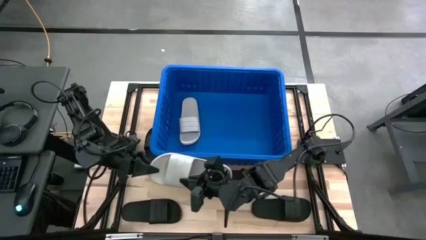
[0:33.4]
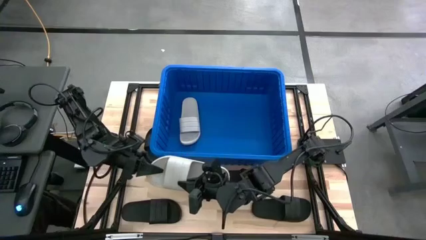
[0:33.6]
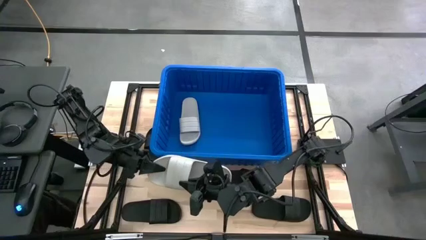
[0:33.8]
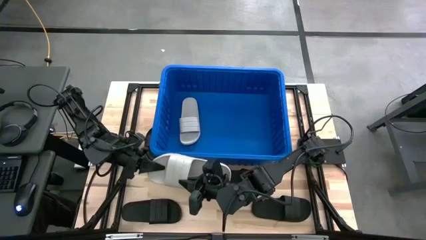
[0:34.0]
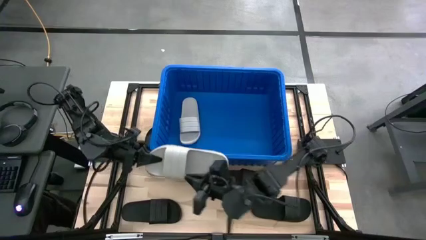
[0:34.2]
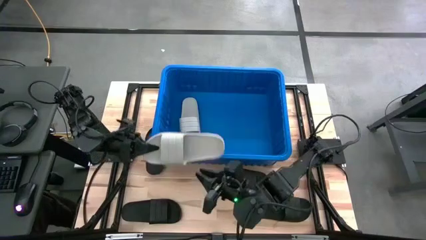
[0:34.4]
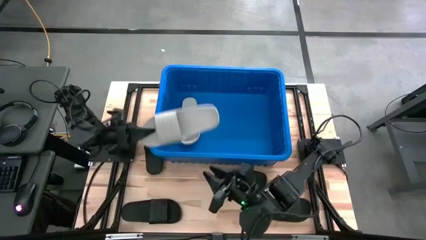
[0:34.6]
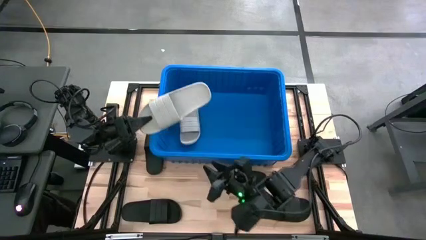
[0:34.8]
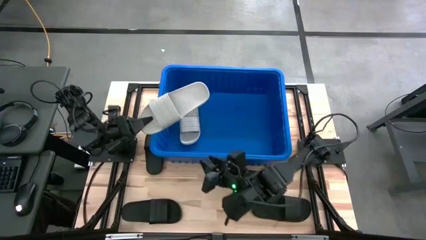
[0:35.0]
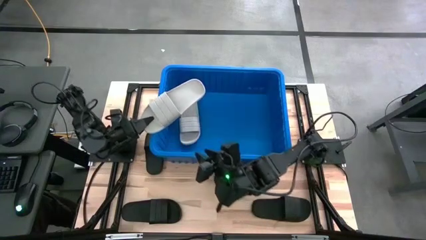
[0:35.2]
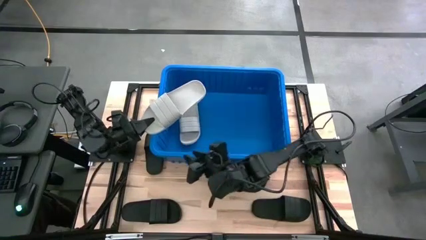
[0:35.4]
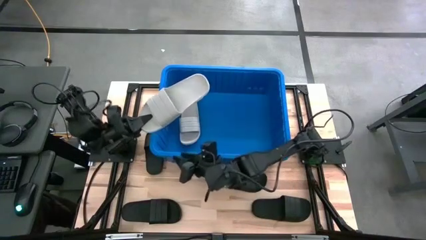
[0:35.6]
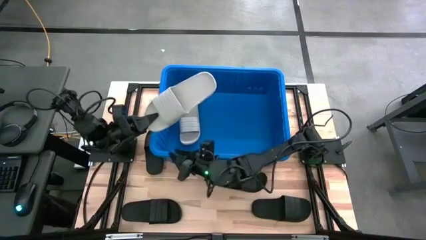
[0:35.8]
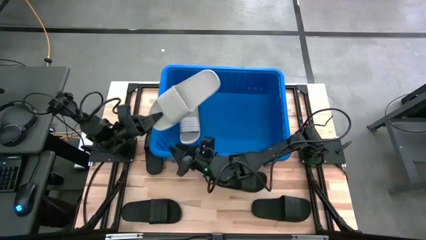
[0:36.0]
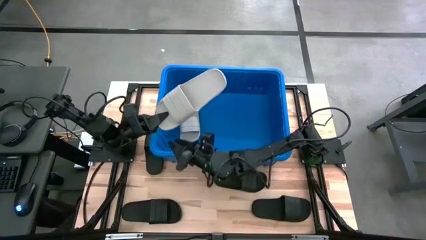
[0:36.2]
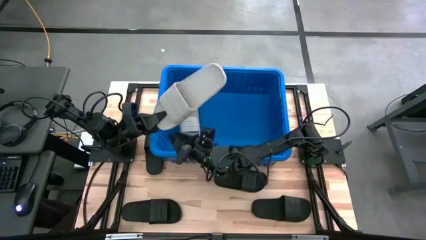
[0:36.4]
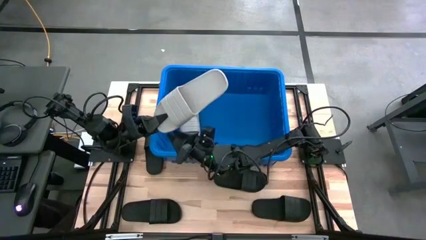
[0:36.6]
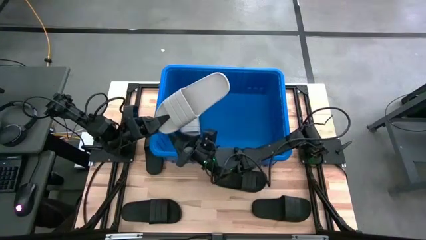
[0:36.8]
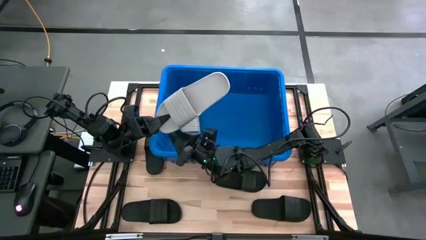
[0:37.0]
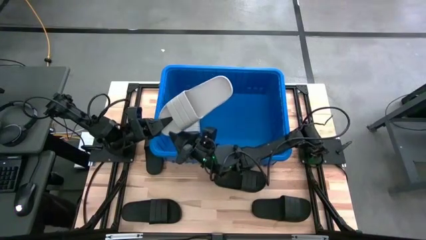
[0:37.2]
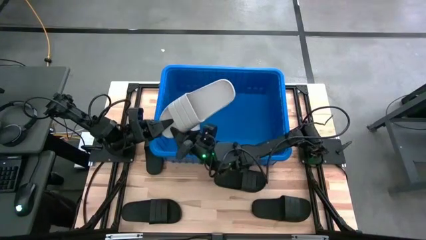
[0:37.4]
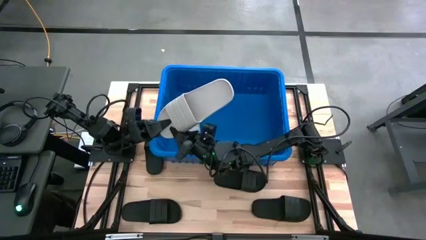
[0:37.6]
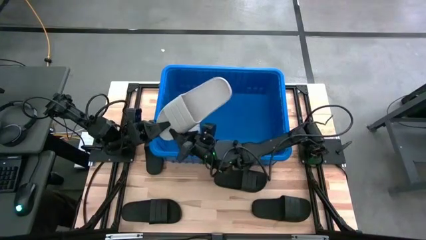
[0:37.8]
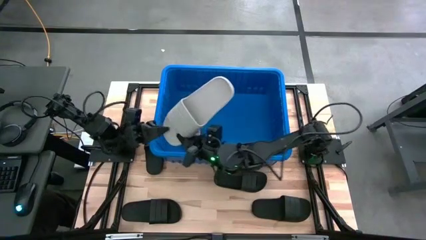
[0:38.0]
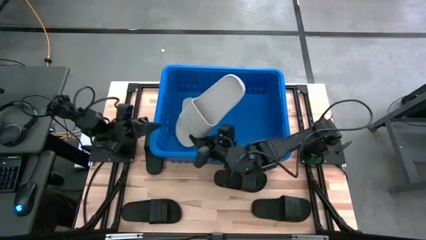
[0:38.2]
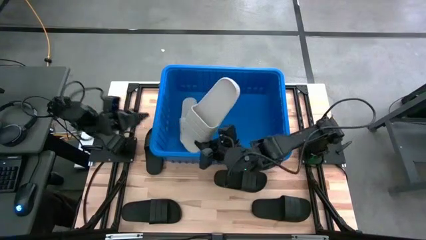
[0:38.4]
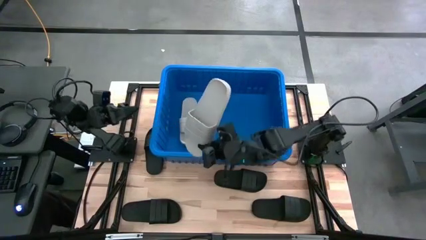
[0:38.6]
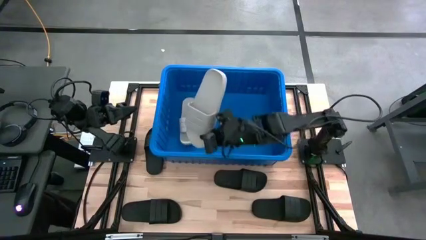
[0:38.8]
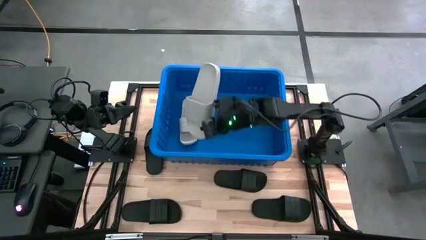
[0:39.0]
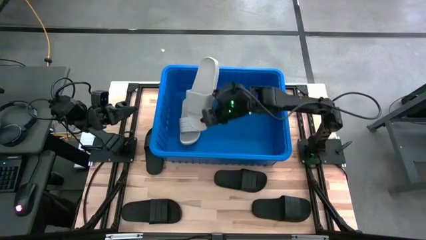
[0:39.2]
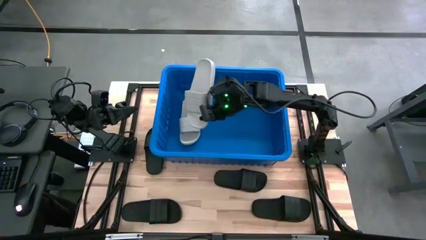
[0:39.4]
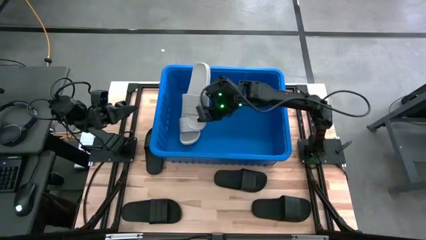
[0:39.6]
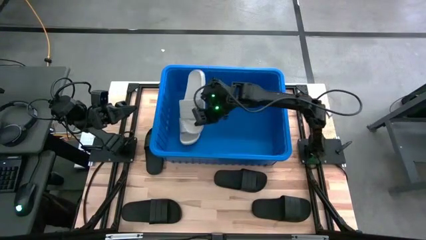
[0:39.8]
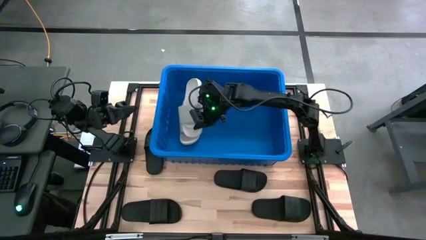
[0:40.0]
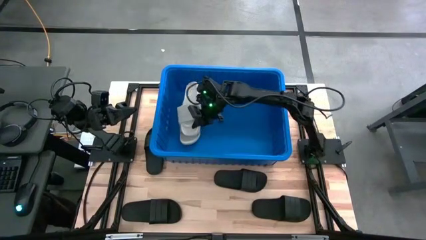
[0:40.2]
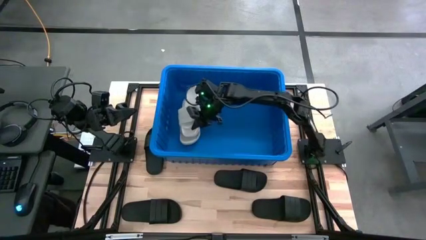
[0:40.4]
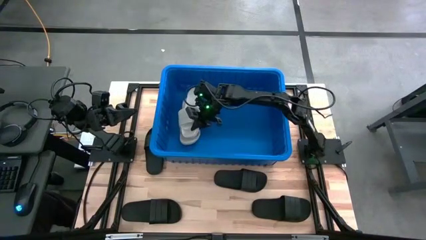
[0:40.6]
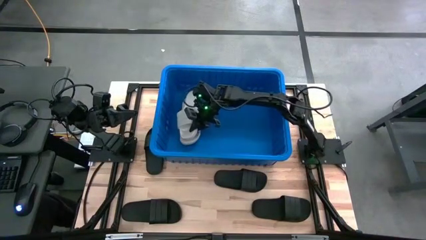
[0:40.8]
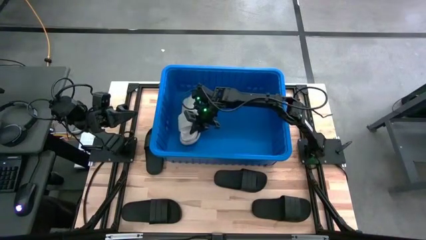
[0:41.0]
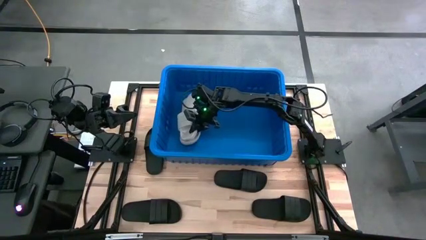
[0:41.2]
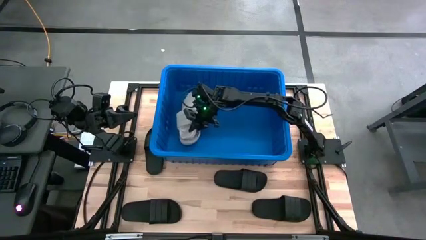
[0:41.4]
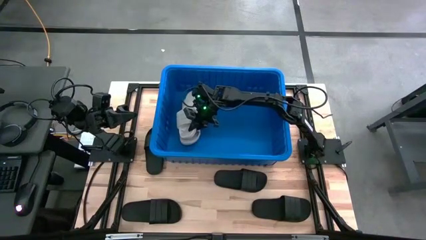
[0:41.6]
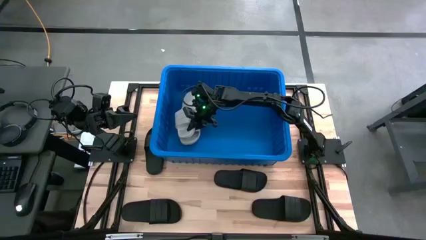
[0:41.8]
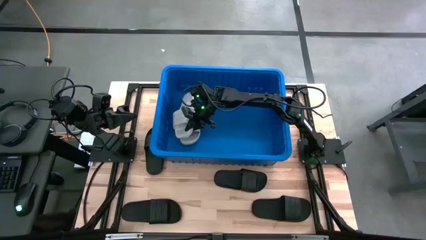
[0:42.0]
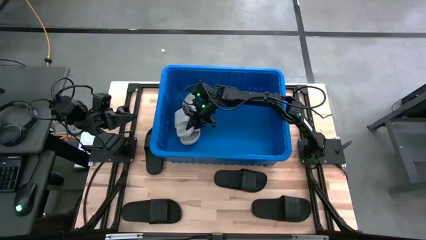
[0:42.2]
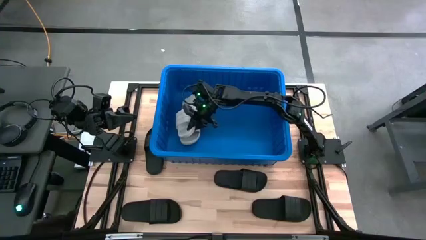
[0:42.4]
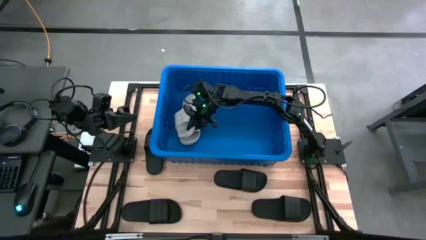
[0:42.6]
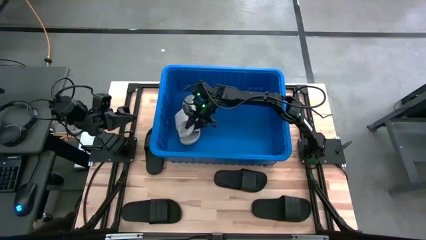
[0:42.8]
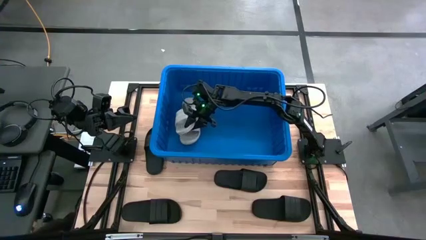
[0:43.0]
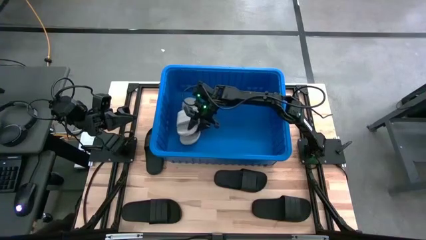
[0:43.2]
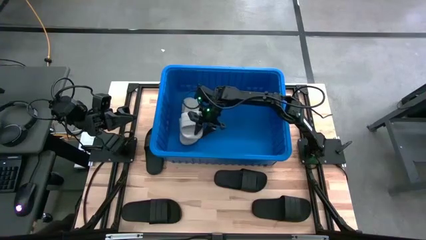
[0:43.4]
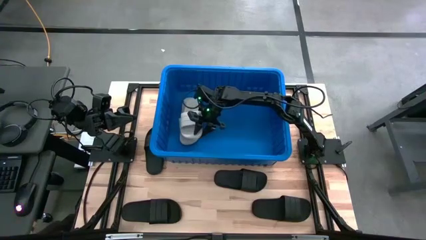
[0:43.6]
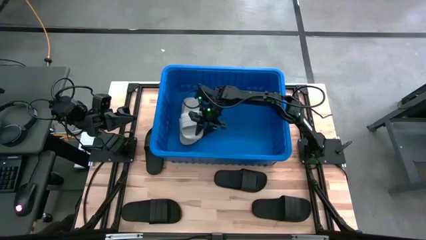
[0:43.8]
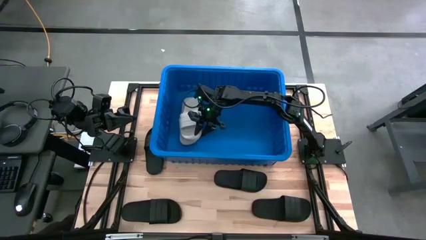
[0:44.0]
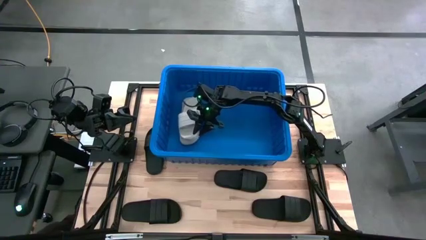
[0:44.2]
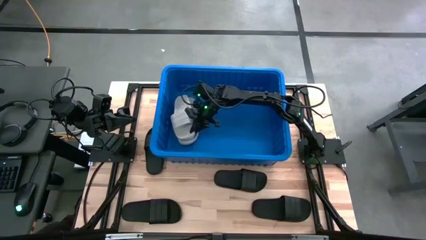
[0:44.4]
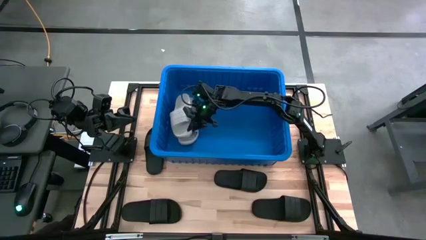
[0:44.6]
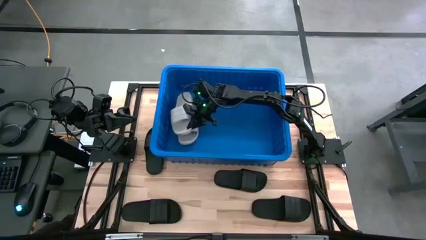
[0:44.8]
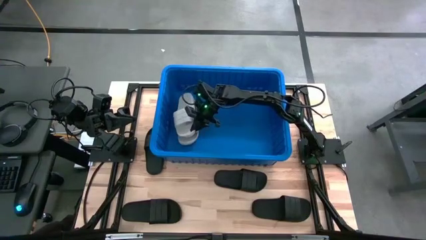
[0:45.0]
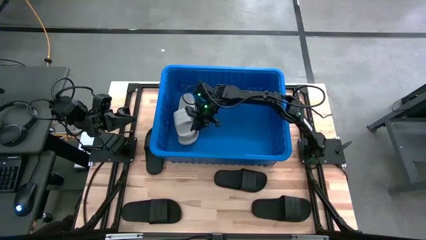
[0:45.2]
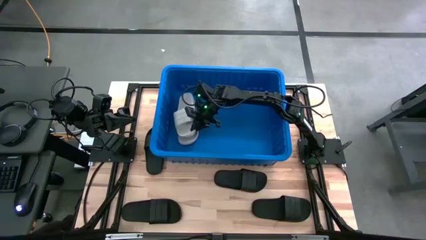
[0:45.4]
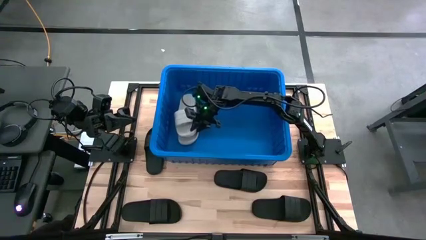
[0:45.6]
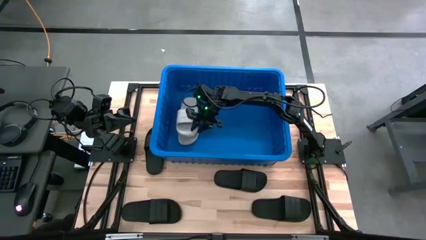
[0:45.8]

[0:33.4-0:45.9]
Task: Pick and place slides into bin
Stack the gray slide on top of the gray slide in the blue bin

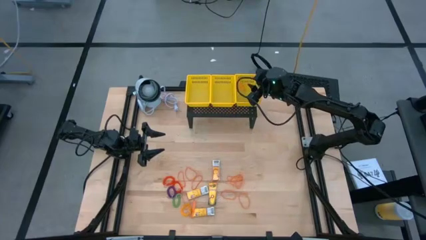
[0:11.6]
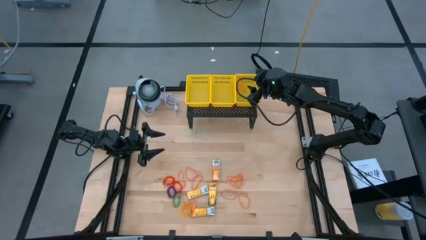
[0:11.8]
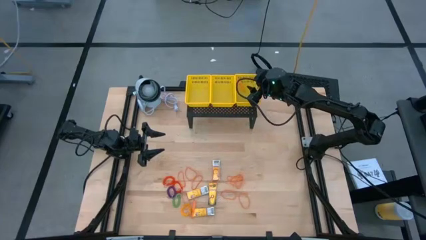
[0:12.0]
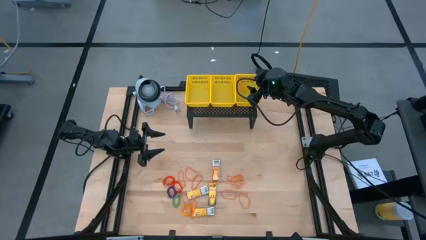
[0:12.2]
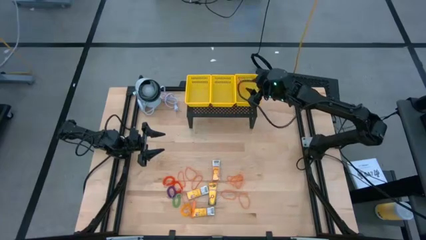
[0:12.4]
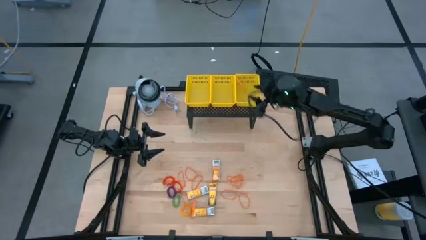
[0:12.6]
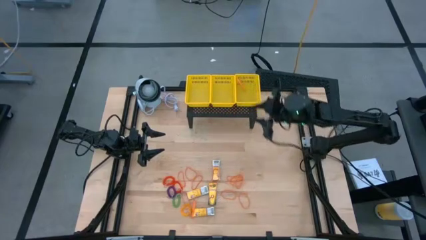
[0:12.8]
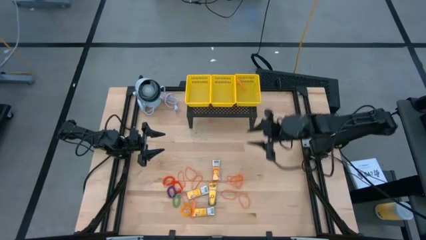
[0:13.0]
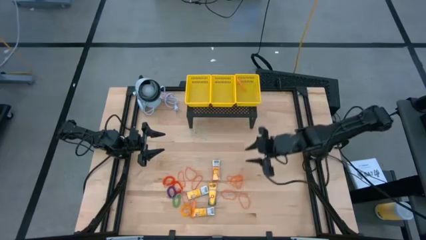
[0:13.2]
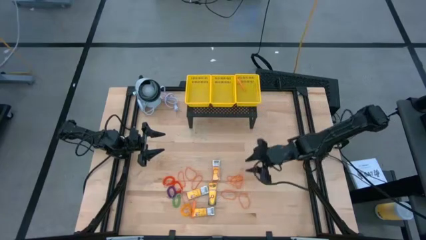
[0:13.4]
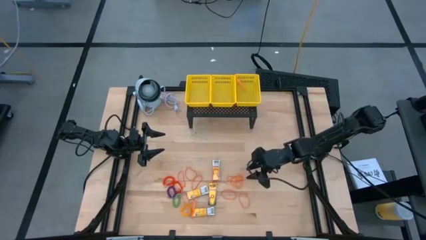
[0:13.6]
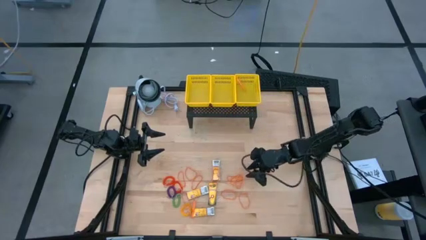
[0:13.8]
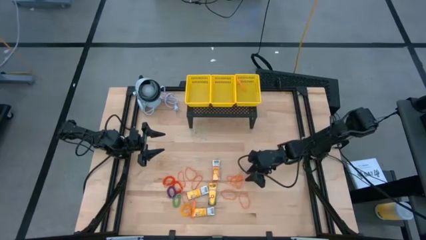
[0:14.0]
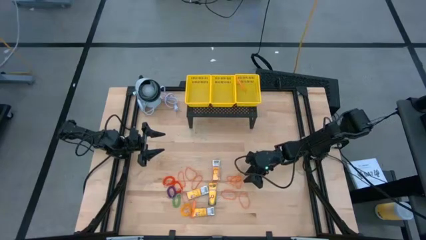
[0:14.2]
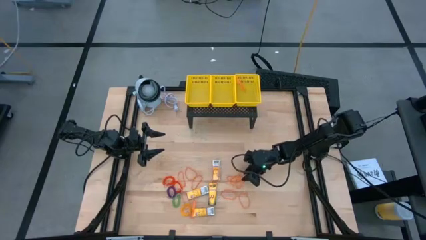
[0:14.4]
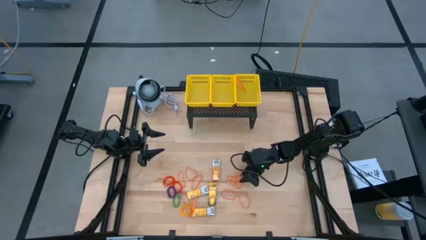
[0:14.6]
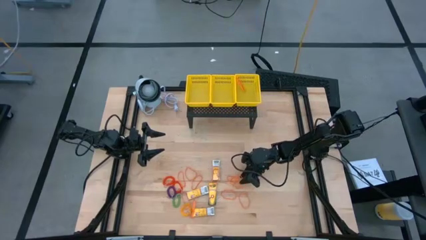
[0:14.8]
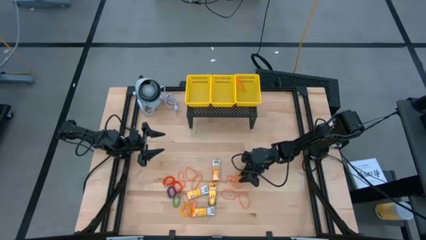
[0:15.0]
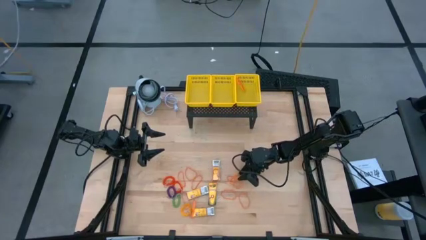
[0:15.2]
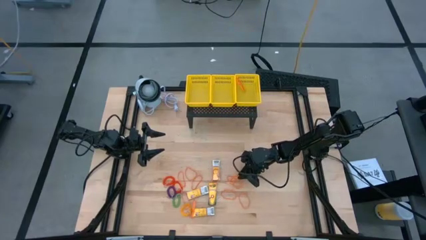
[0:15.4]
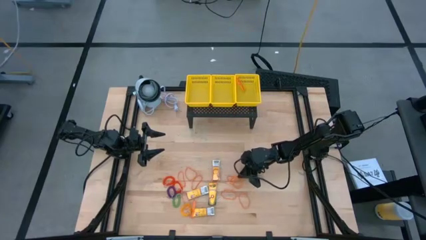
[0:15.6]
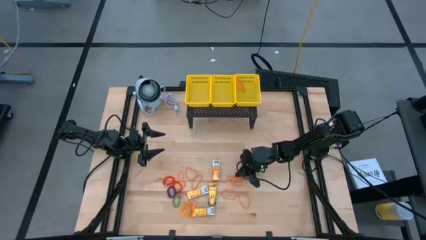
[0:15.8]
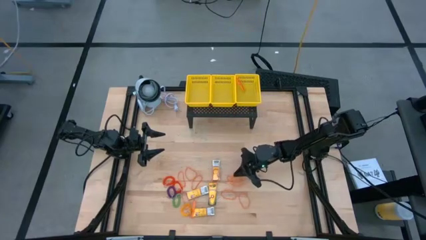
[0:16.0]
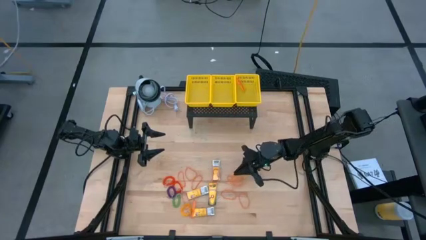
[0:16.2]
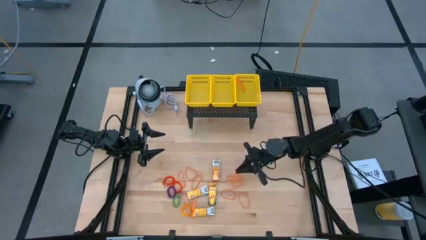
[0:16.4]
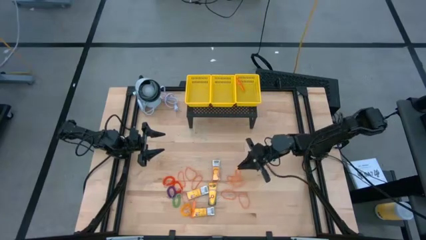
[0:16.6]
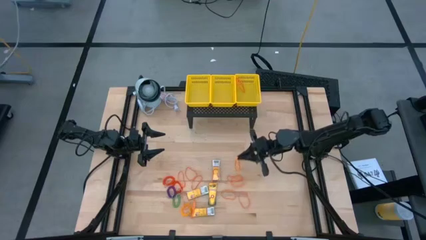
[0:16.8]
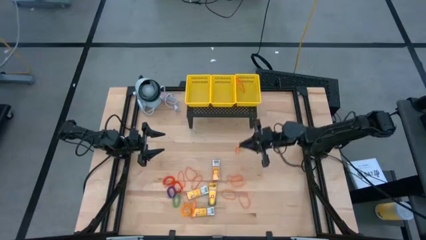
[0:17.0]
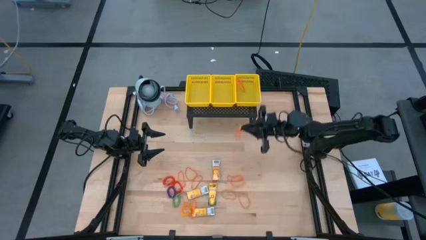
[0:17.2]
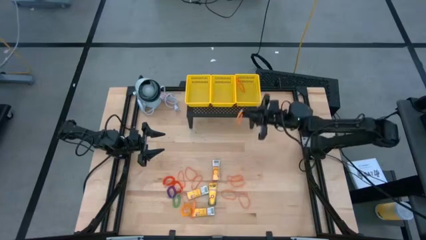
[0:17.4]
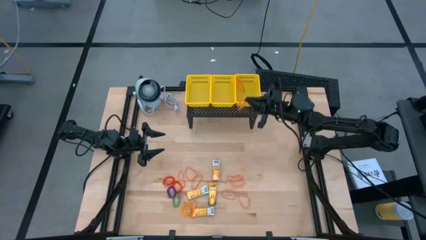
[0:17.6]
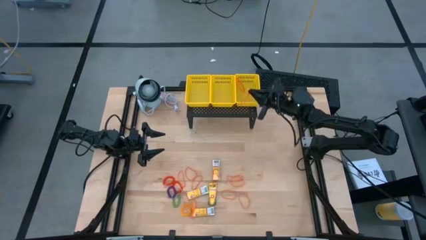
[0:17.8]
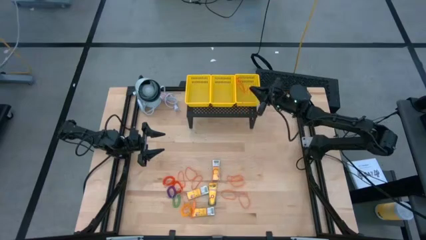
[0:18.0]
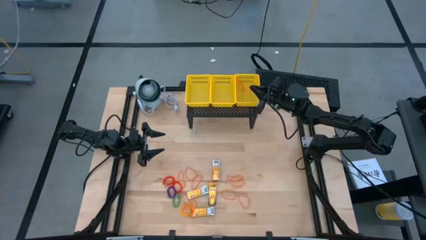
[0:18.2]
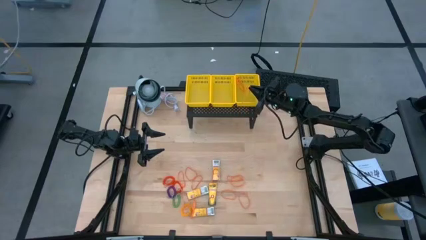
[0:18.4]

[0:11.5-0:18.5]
Task: Pick & Place Office Desk Supplies
Put the orange rubber band into the right yellow bin on the shelf
